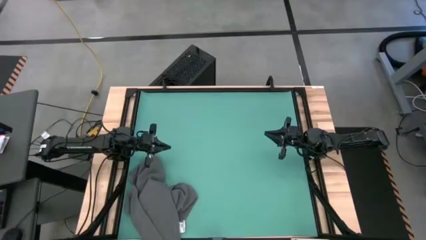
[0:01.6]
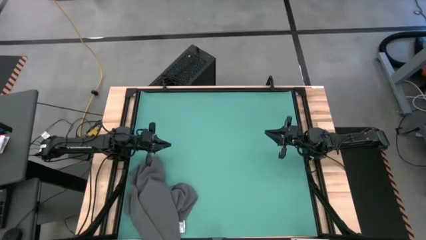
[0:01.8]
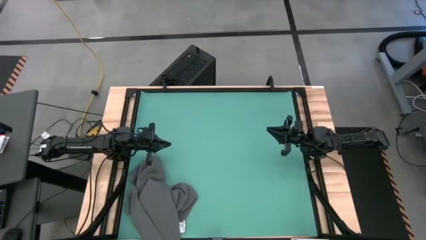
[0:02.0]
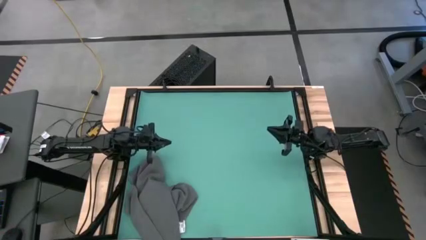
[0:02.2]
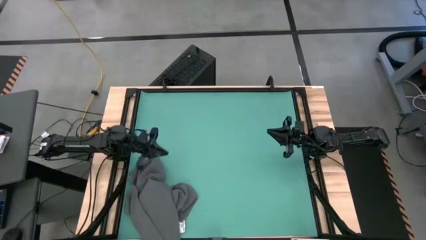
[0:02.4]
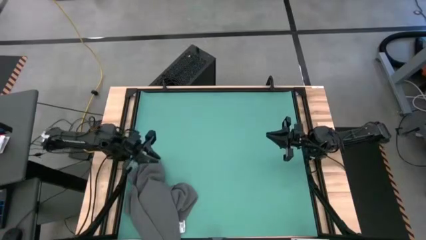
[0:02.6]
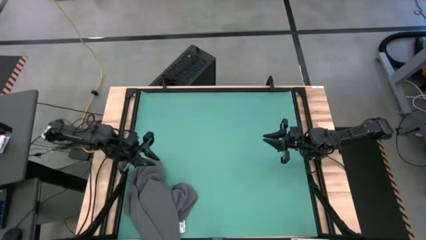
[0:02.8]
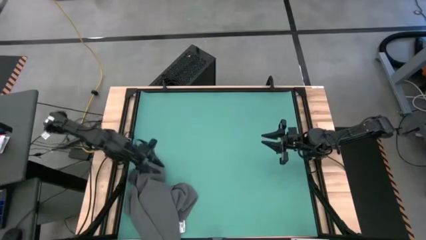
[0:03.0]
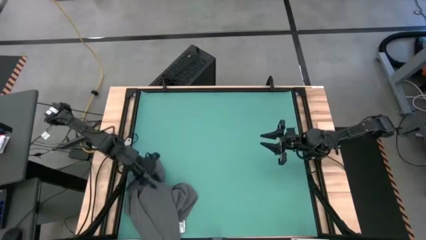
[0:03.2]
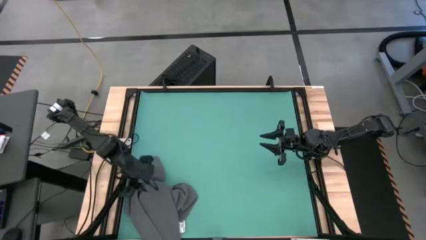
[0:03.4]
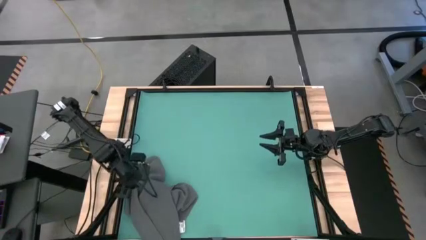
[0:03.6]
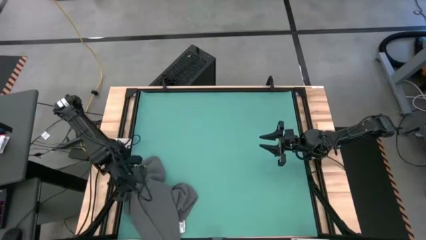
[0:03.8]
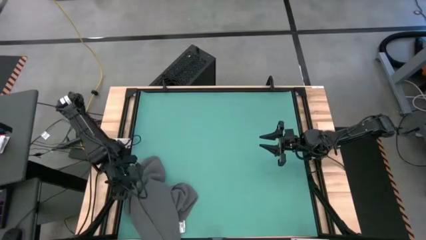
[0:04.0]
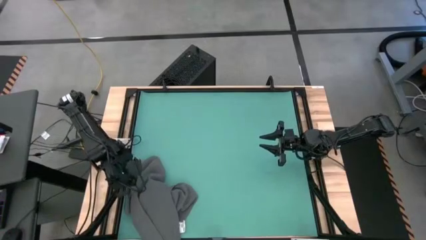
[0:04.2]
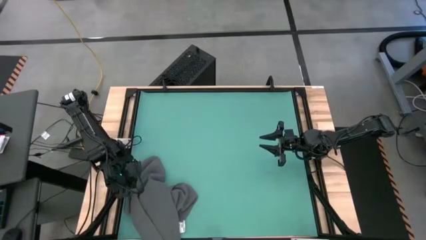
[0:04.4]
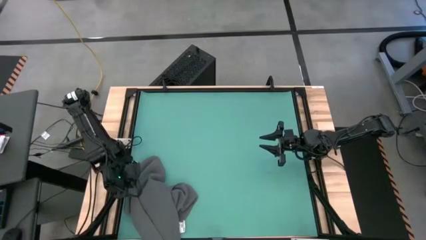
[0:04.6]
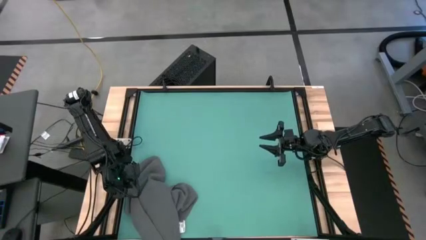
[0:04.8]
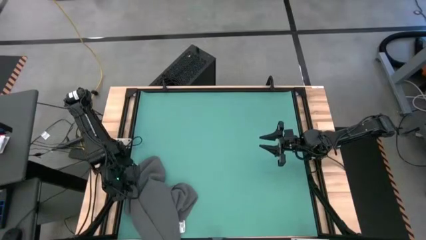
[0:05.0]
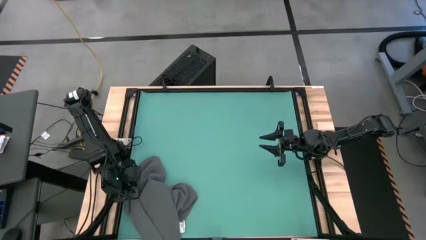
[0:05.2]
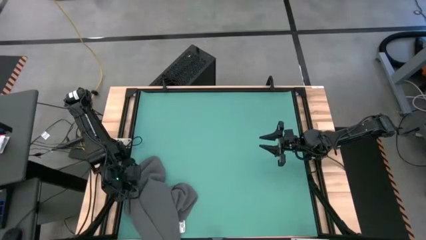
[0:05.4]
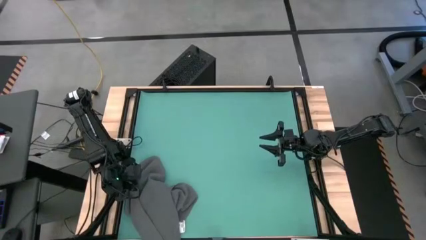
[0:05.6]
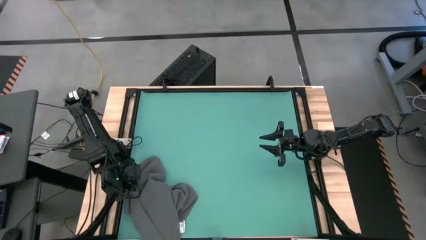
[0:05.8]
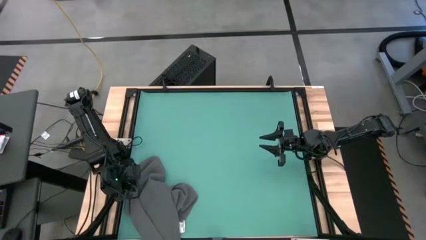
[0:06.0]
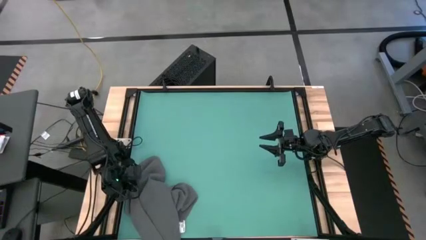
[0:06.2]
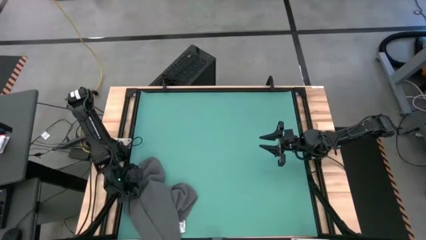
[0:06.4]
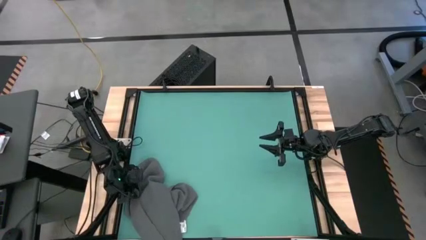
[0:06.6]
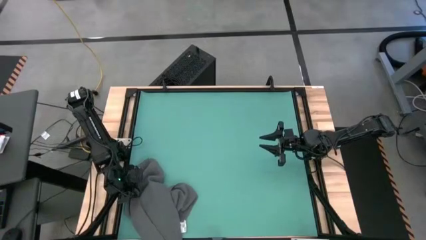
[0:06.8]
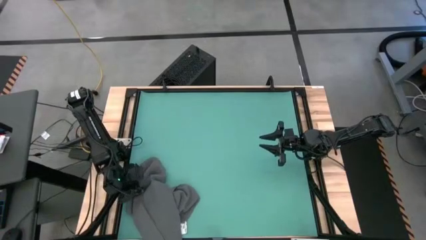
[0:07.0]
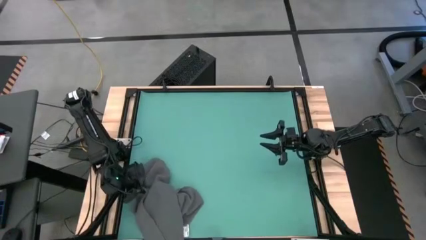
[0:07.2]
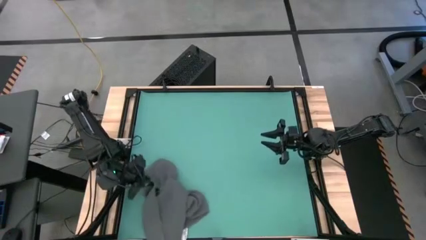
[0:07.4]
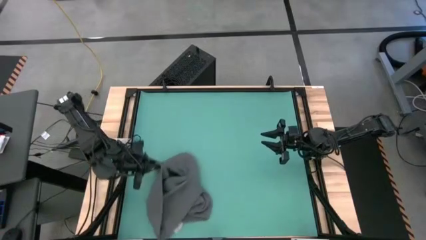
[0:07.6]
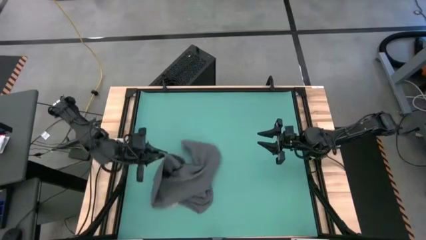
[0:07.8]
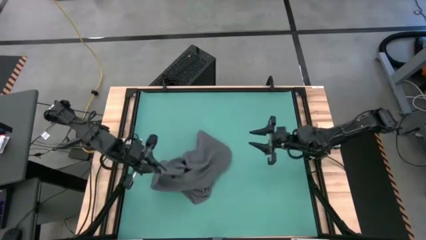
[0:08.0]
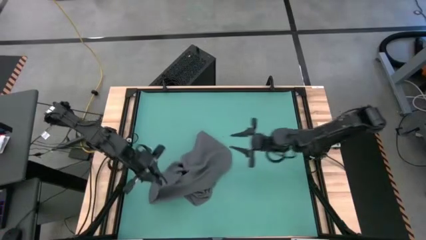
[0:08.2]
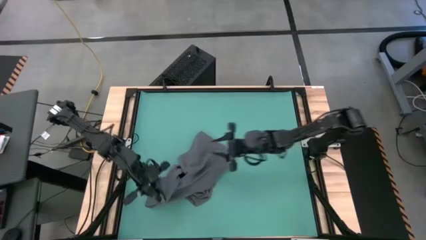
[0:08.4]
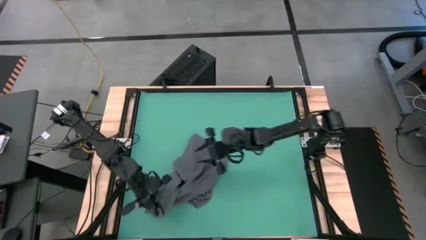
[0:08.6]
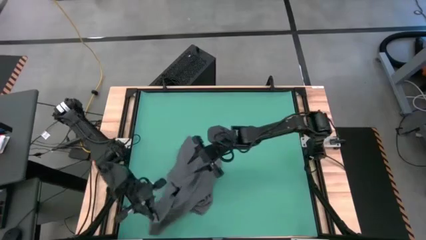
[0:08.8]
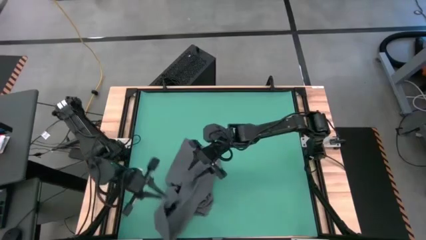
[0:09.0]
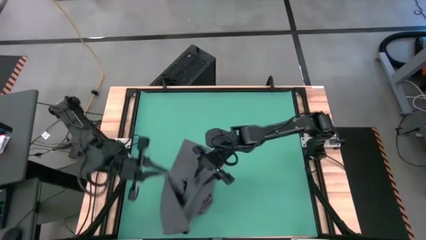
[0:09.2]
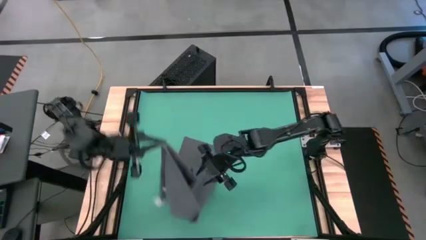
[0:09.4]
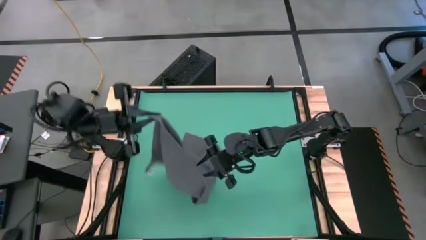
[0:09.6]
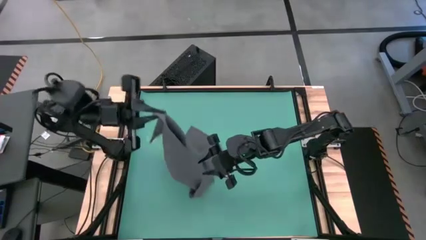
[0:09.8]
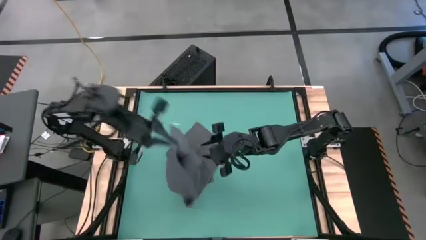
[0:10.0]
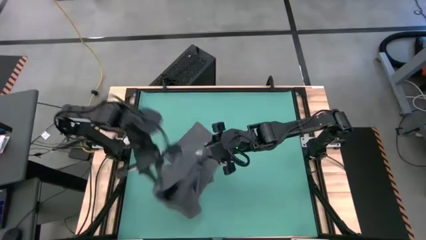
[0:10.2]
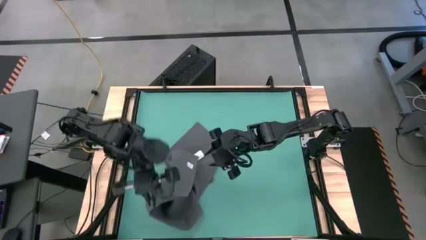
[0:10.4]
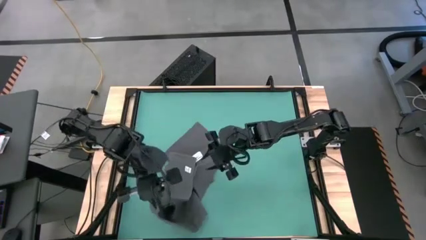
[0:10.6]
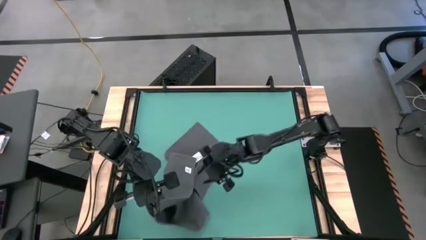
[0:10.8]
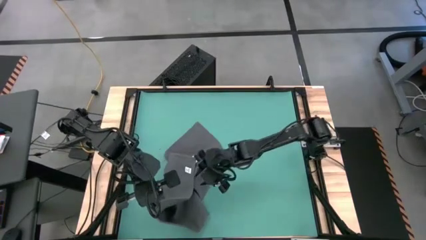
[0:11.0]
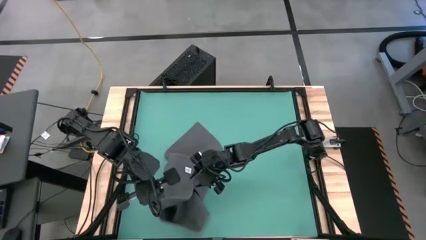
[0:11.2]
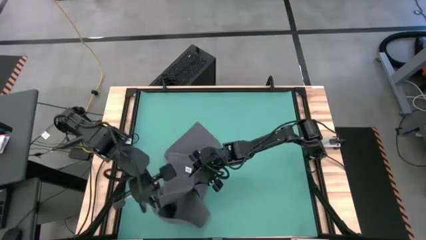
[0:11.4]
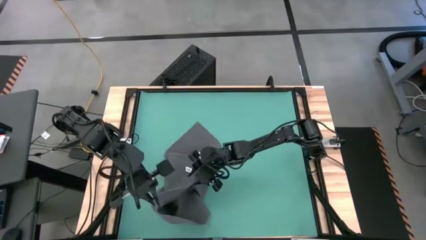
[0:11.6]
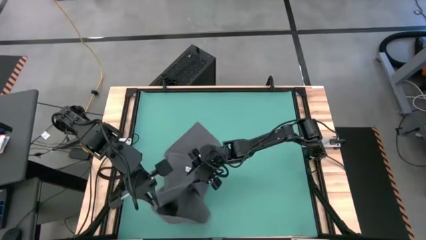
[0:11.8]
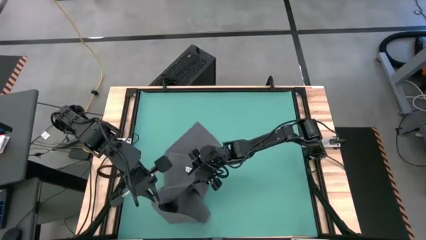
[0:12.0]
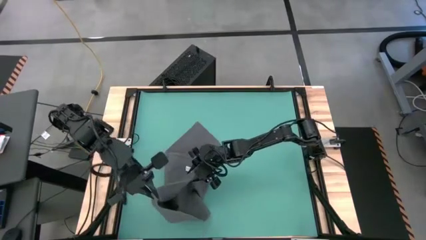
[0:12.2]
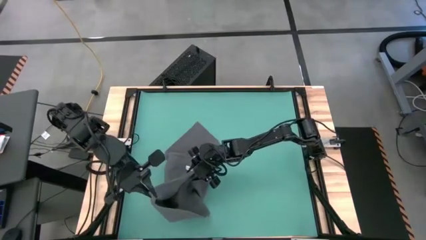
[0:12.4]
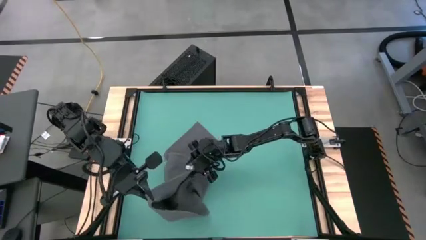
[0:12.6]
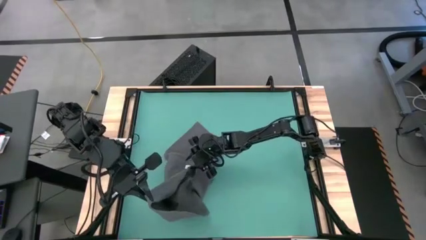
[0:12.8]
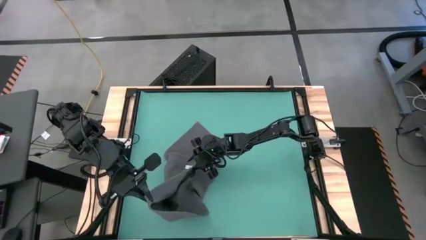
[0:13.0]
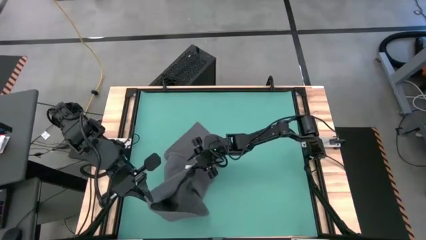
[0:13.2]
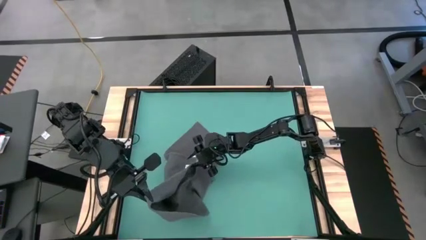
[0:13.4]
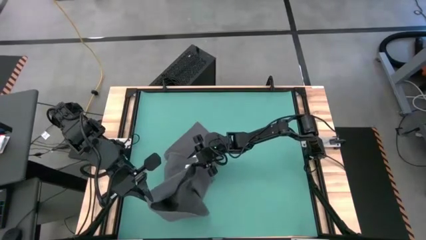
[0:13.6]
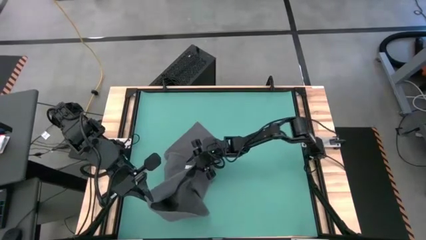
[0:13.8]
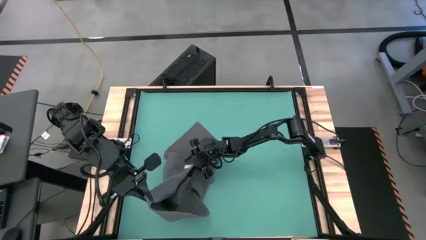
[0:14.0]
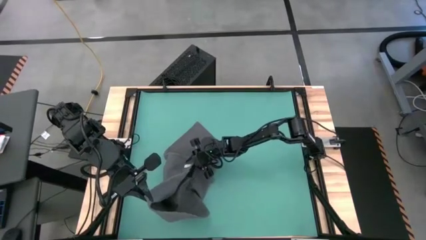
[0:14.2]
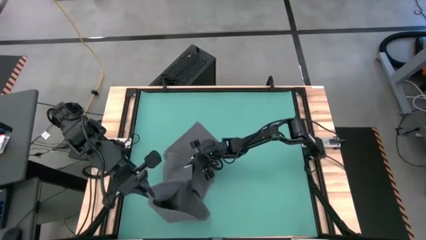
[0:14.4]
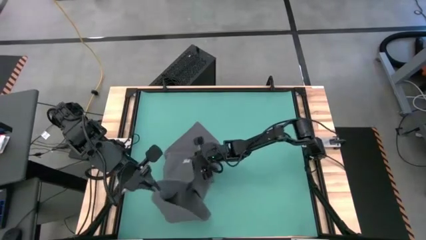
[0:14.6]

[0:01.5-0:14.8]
Task: Roll towel
Prepare the gray towel for folding
